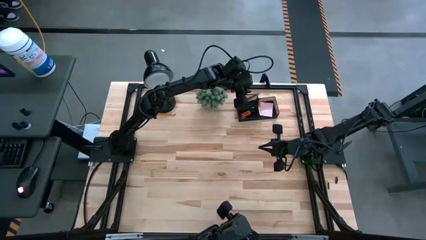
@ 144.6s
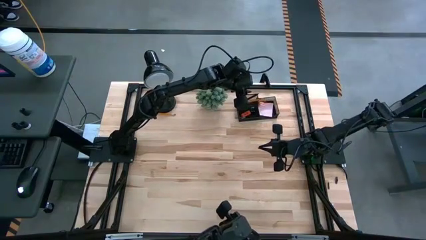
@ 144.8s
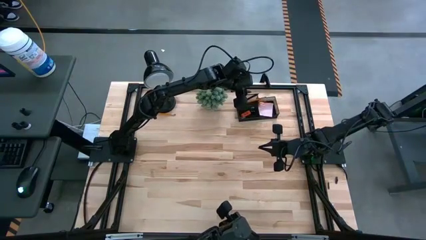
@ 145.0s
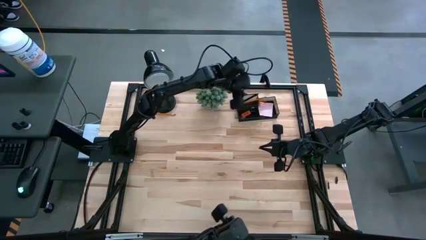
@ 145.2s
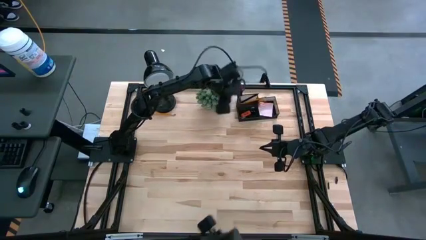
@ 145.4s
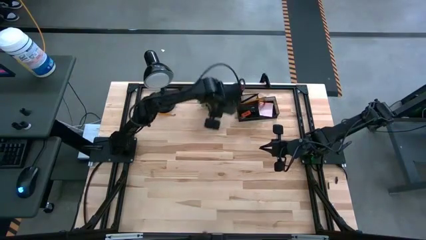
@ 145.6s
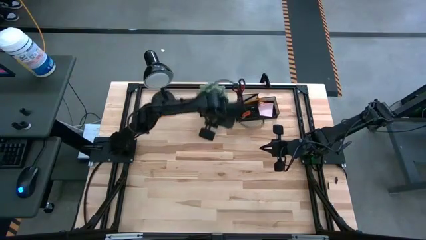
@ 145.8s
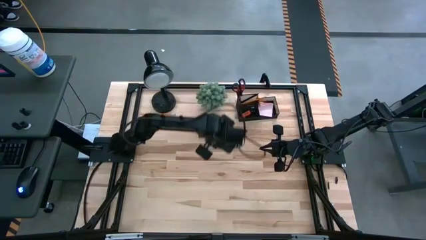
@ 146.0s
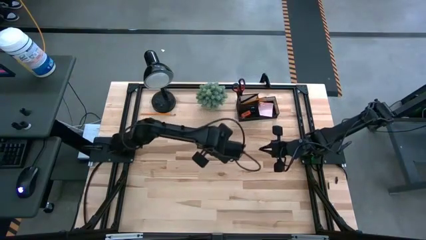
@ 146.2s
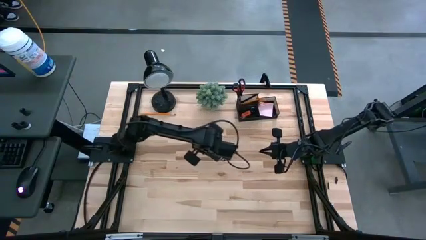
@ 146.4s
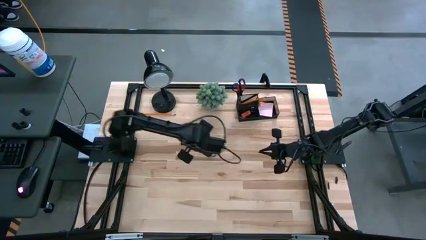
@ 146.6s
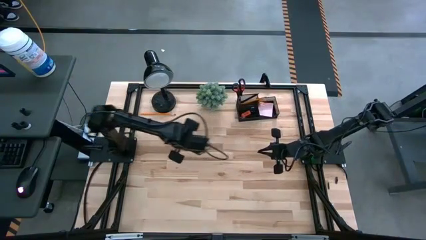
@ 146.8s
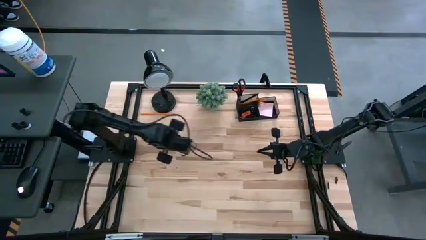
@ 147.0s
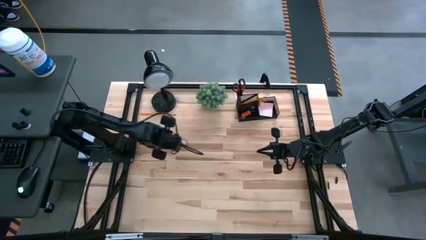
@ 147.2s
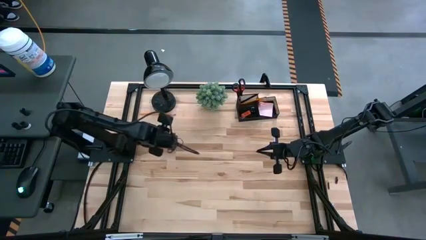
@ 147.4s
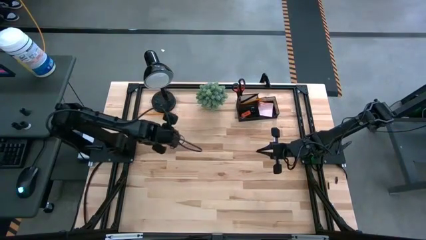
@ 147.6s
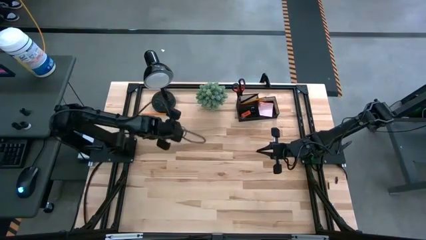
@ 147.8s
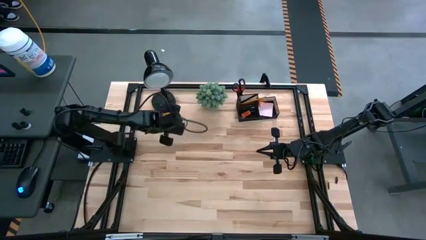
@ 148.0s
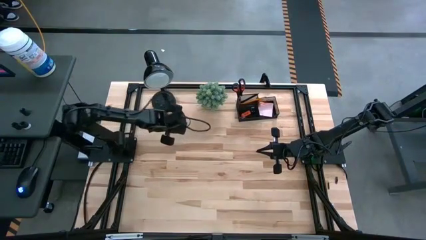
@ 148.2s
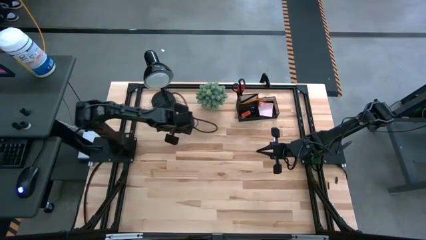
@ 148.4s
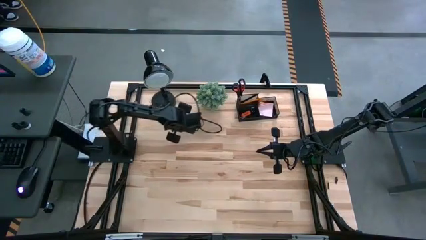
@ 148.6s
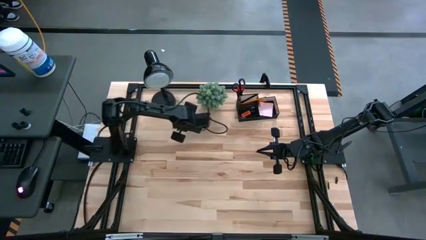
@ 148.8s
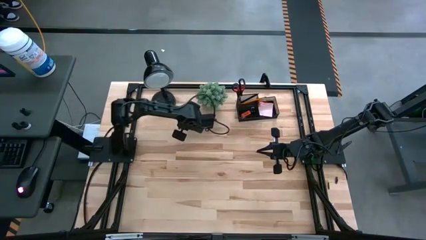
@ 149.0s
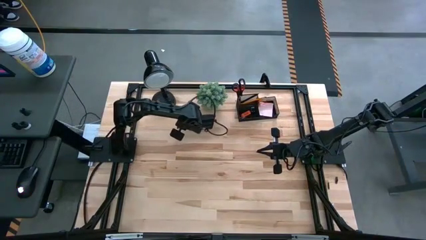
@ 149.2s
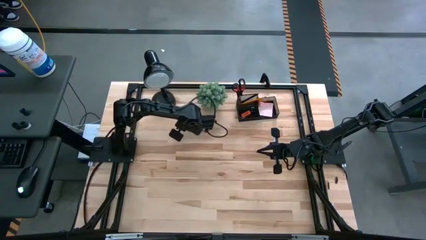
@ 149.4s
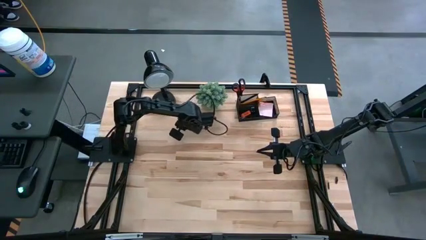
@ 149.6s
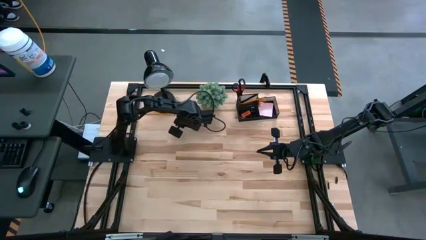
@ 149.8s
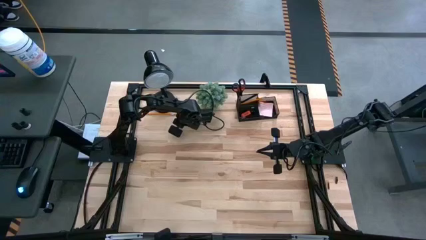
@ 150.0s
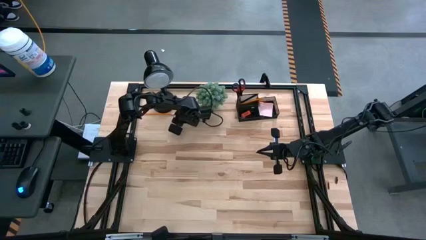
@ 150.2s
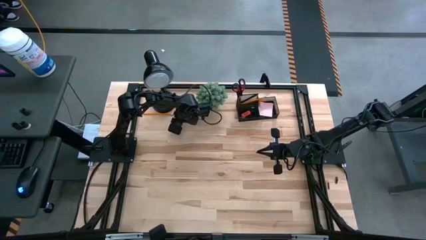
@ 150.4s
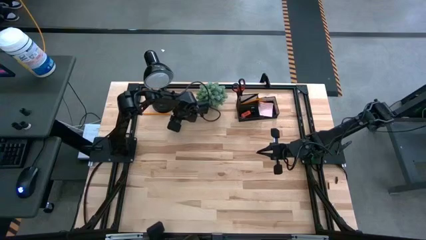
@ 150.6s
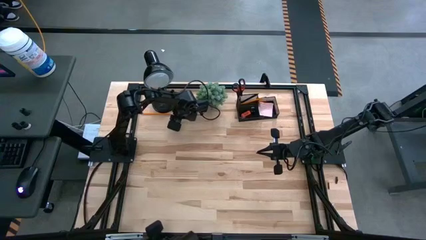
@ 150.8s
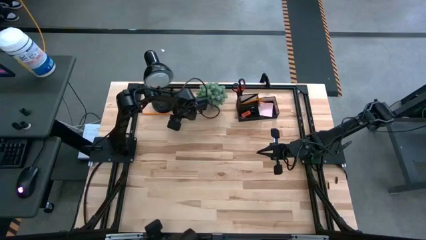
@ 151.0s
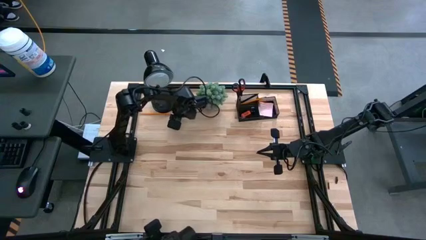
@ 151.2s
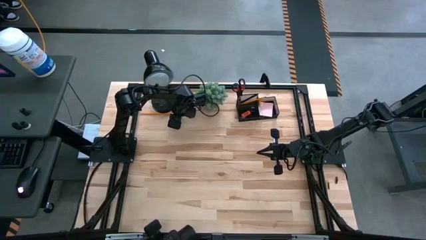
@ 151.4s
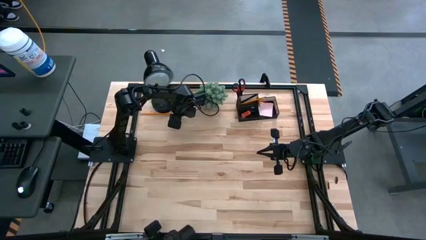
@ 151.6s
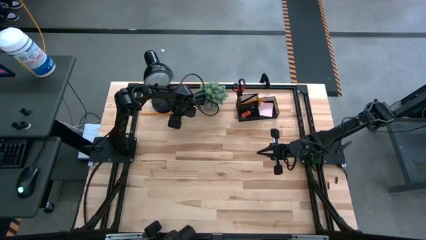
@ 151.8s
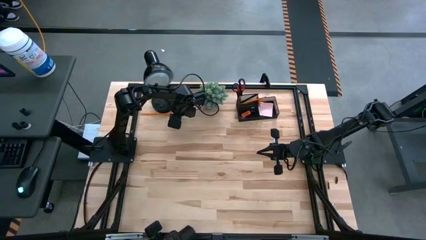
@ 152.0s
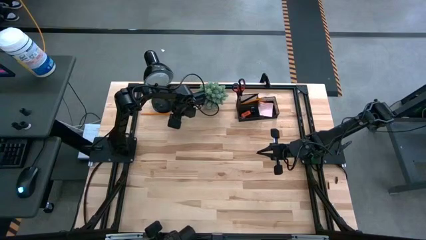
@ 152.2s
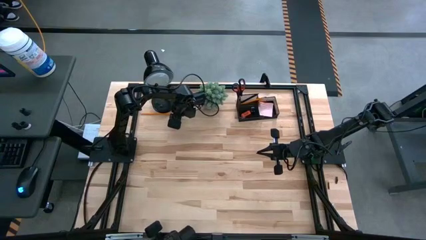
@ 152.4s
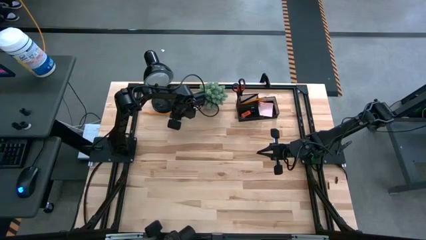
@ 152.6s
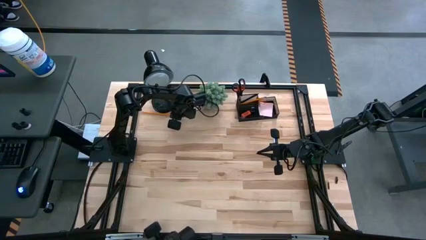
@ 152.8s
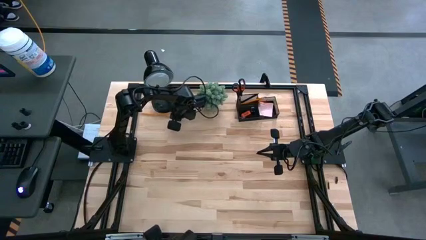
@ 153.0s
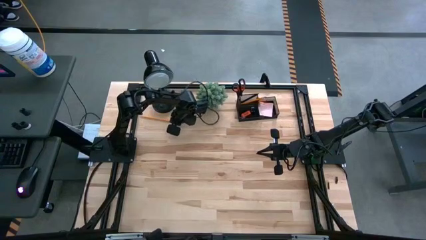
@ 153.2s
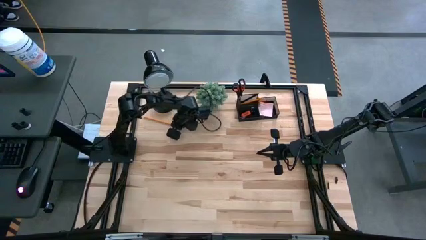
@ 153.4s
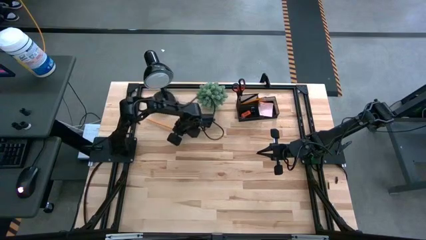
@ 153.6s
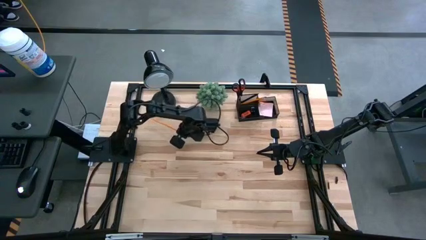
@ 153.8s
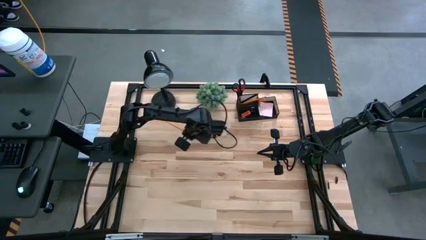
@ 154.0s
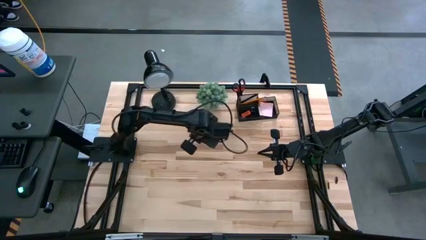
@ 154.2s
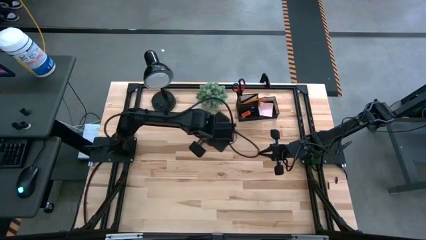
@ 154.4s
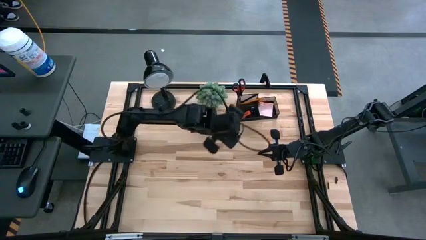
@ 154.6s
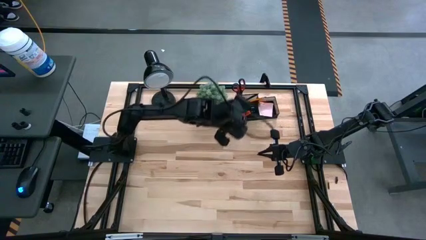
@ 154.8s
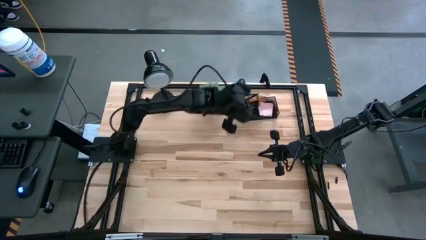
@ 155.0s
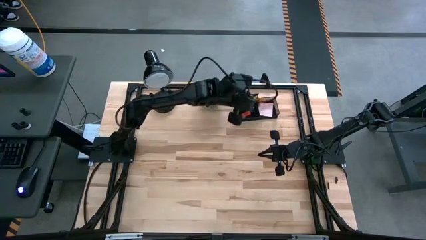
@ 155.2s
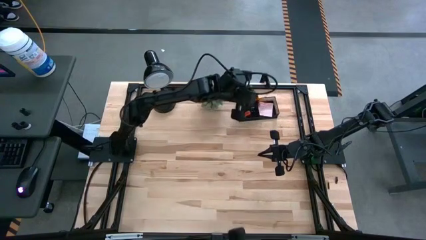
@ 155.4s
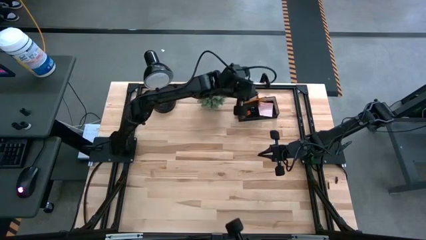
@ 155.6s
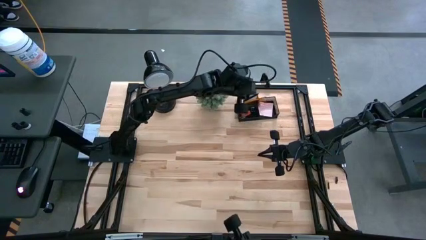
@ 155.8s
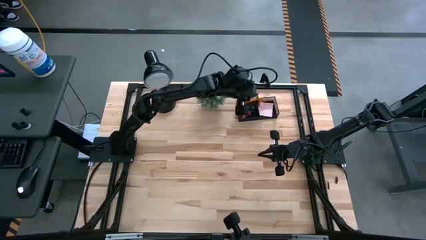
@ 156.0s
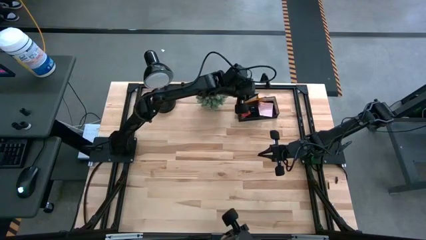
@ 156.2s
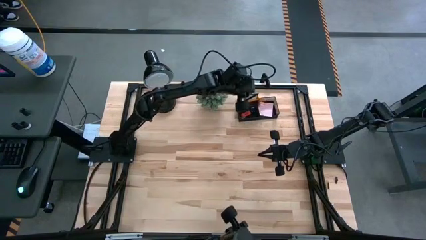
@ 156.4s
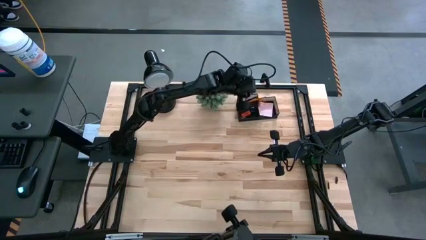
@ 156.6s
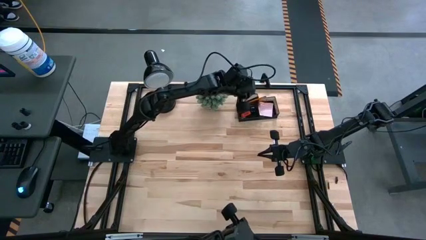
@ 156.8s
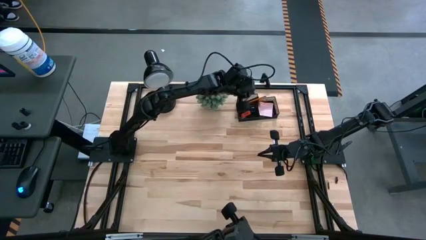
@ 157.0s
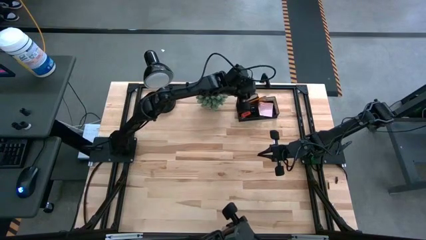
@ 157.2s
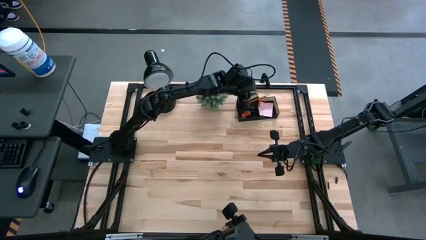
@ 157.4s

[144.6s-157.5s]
Task: Pick and place office supplies into organizer
Put the orange pencil into the black desk organizer
